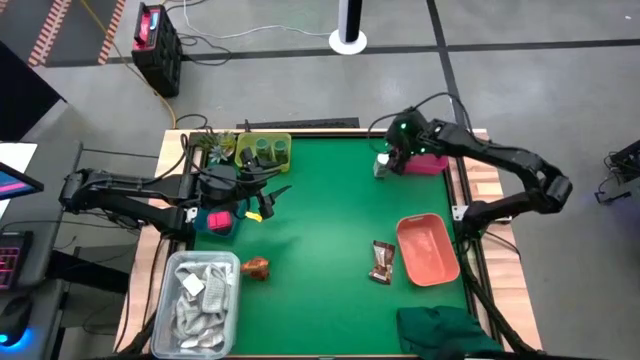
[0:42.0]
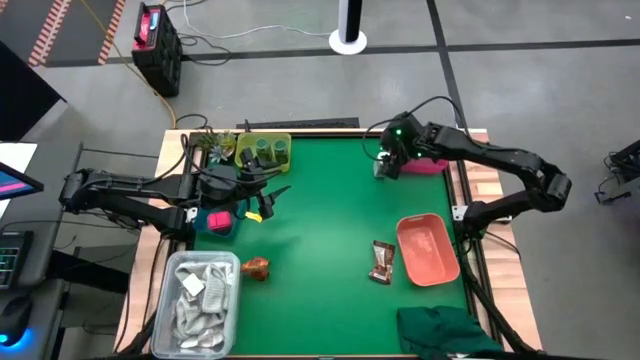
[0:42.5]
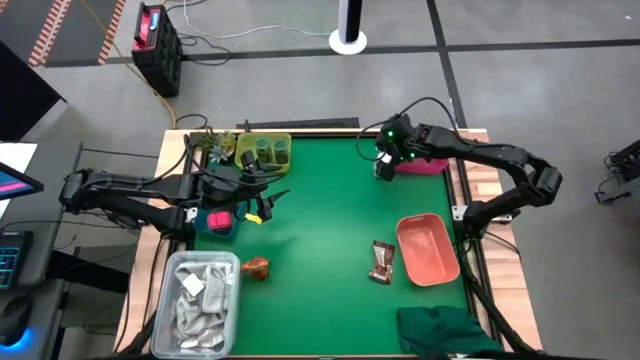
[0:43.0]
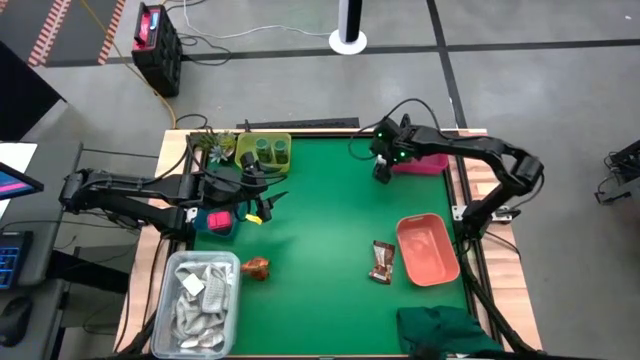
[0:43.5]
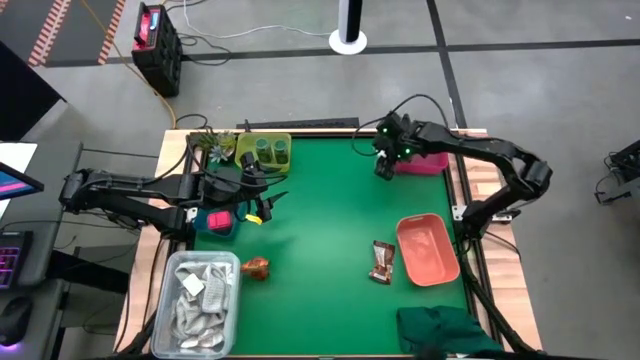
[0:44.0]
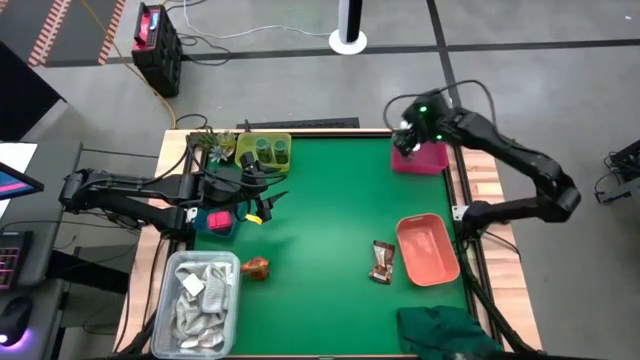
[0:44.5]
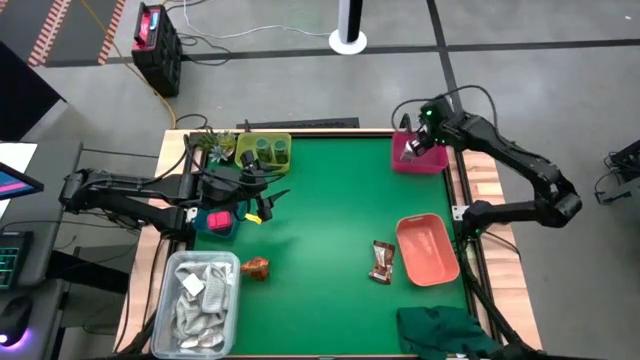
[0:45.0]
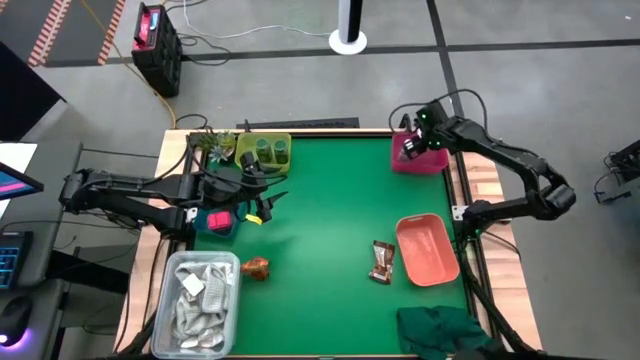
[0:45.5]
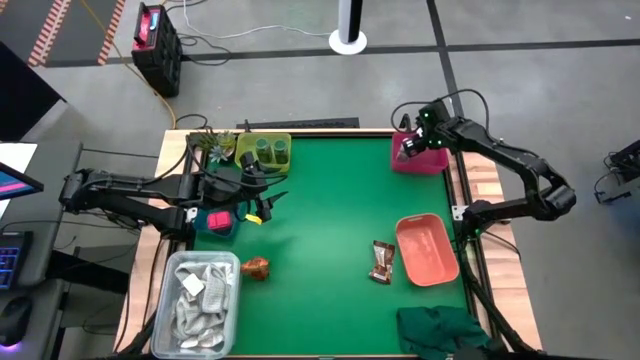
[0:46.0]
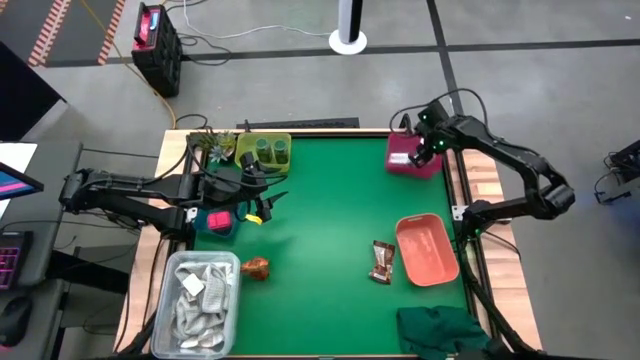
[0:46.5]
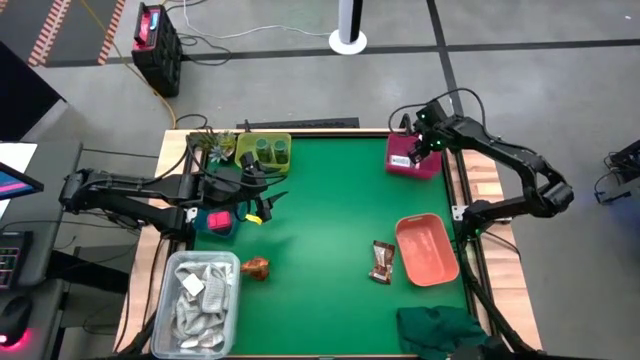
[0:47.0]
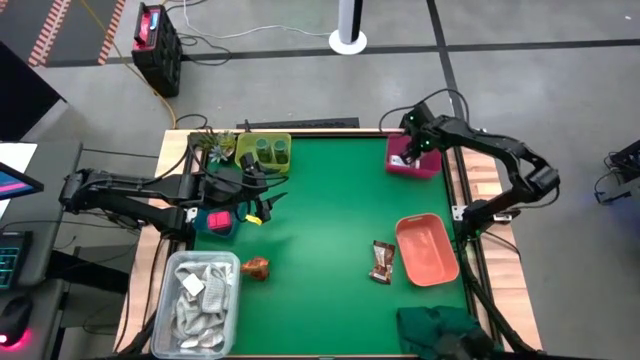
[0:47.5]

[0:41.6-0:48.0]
Task: Sort spices by type
Put the white seasoning bottle into the red bin

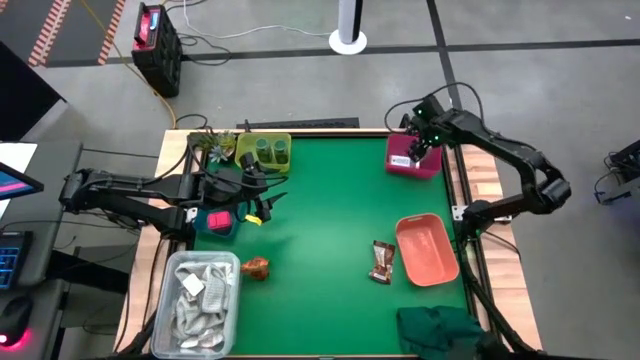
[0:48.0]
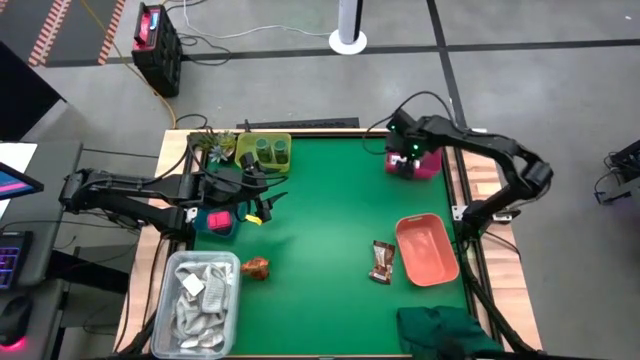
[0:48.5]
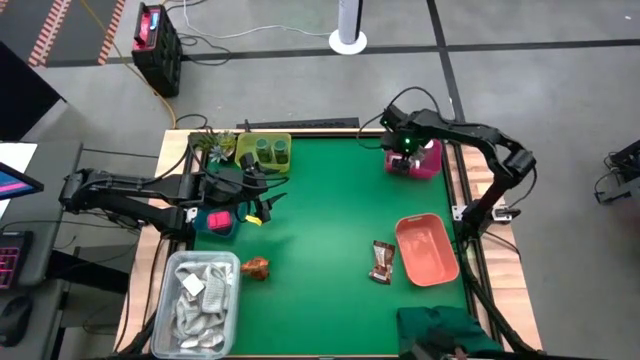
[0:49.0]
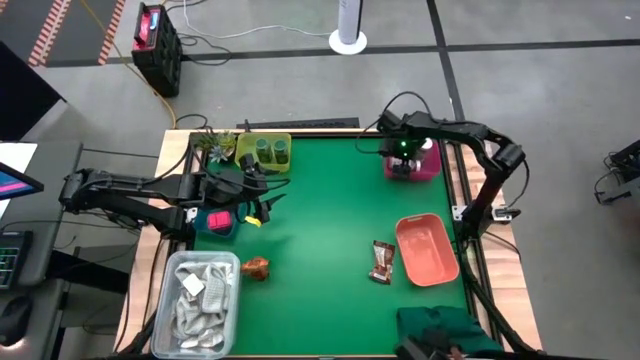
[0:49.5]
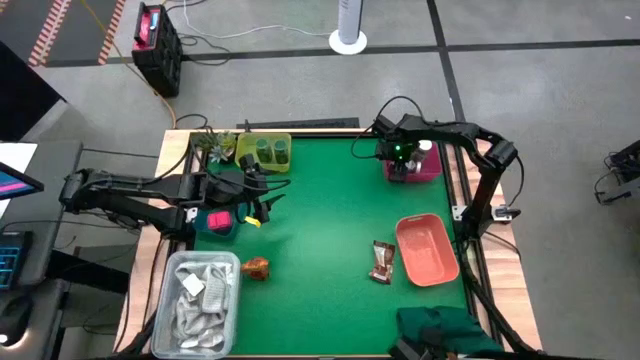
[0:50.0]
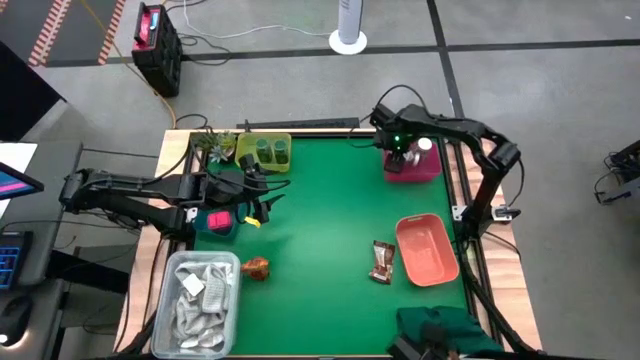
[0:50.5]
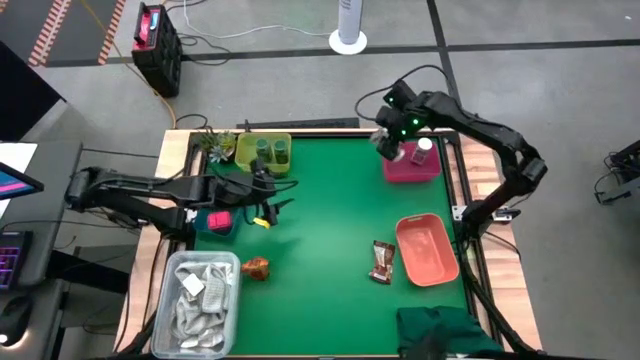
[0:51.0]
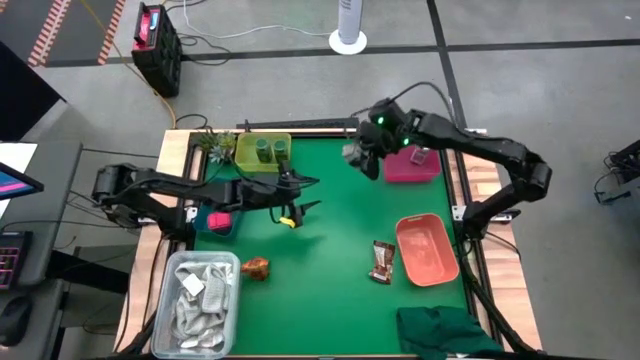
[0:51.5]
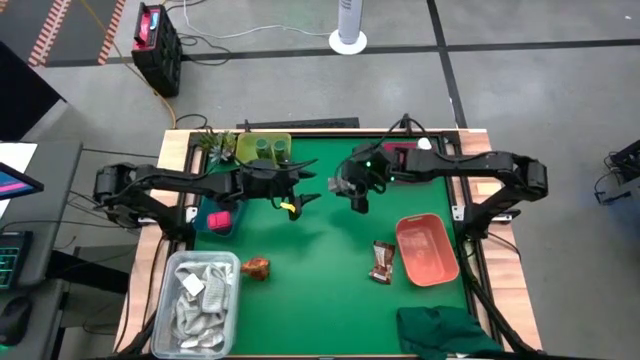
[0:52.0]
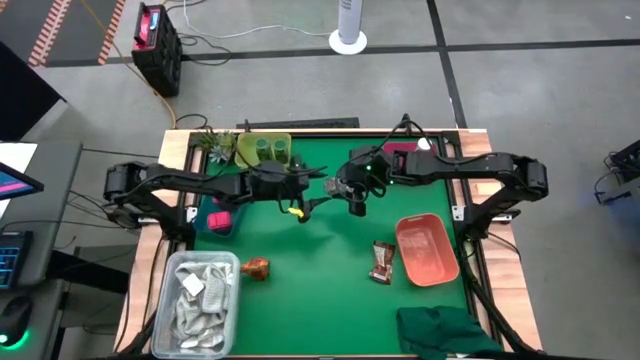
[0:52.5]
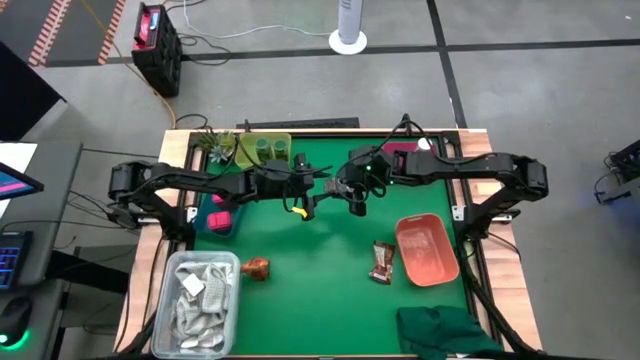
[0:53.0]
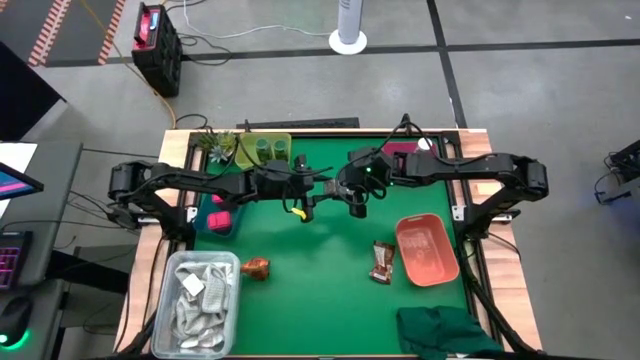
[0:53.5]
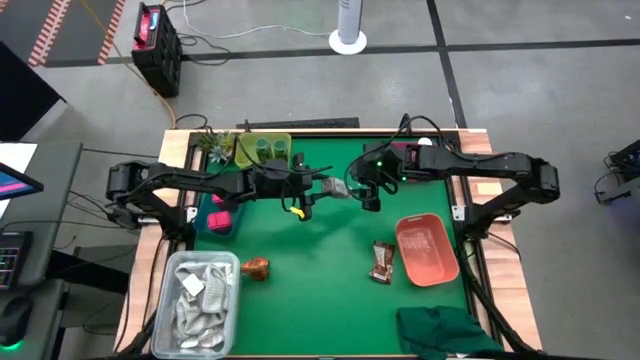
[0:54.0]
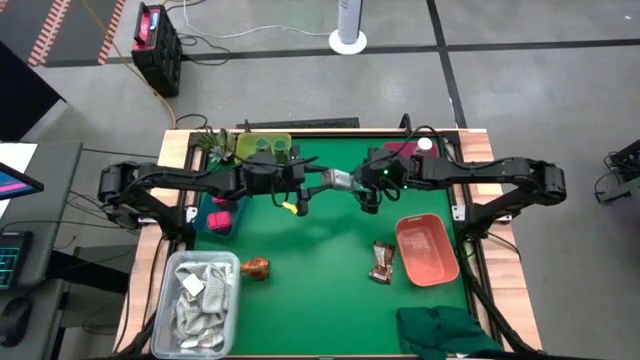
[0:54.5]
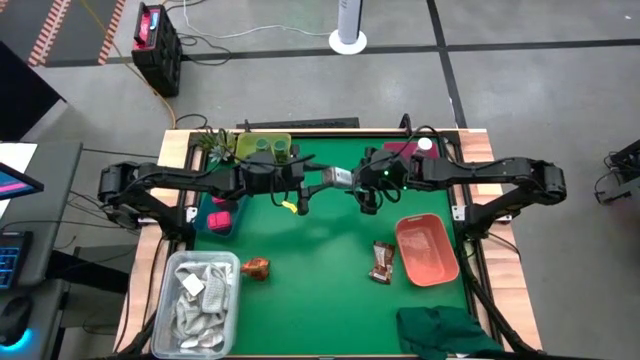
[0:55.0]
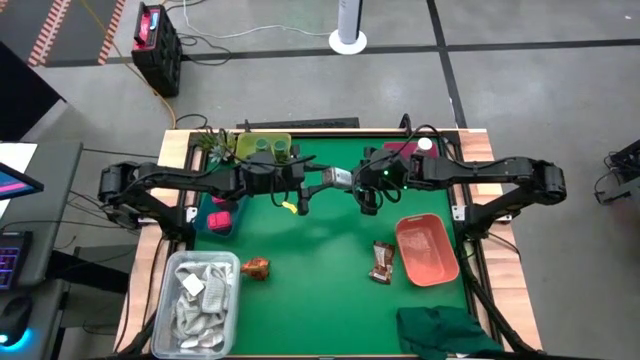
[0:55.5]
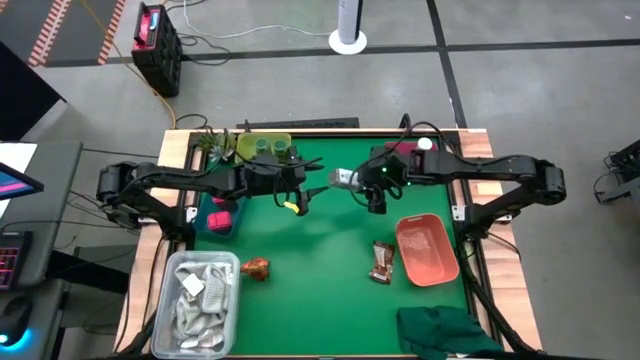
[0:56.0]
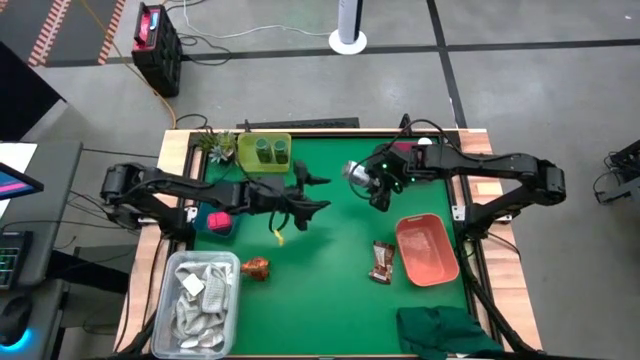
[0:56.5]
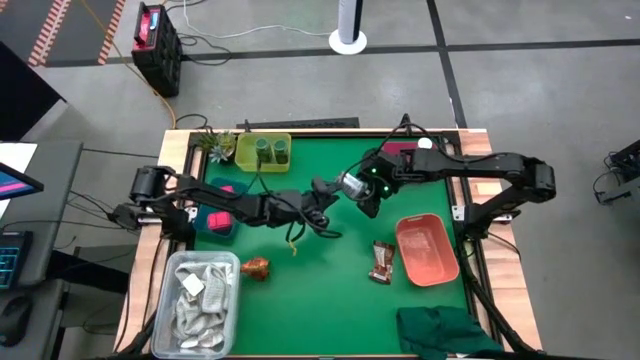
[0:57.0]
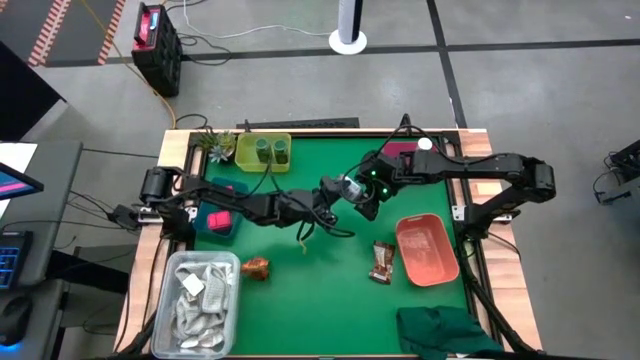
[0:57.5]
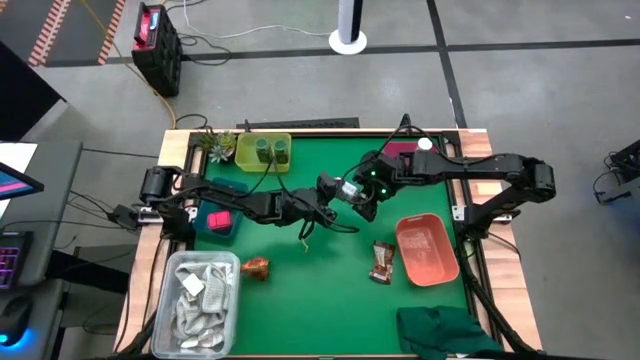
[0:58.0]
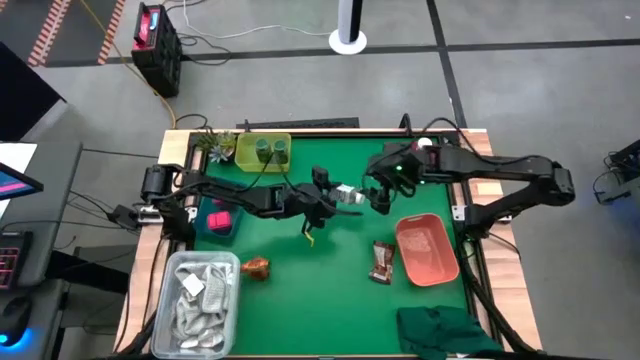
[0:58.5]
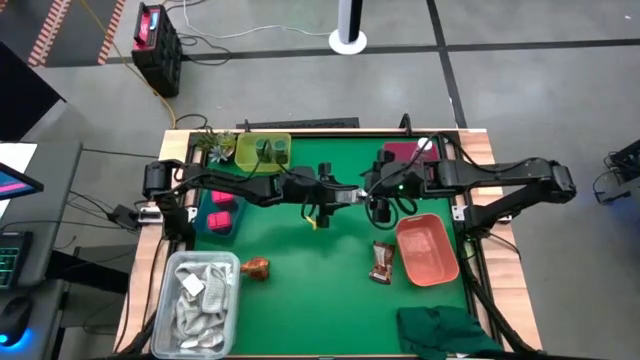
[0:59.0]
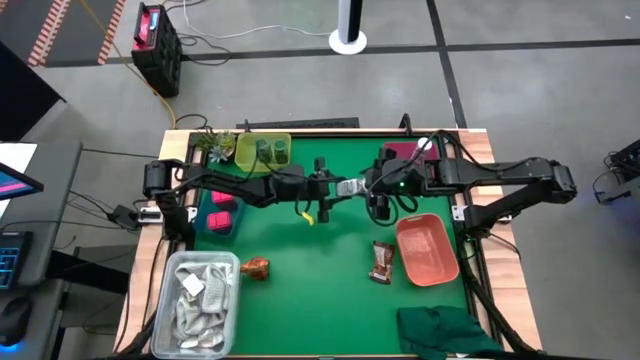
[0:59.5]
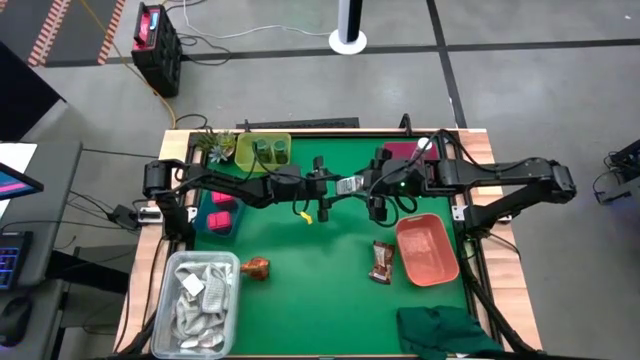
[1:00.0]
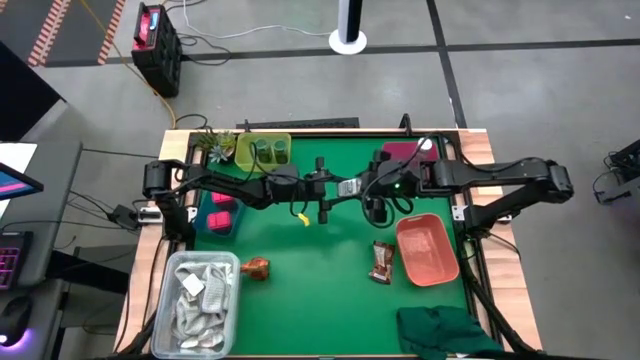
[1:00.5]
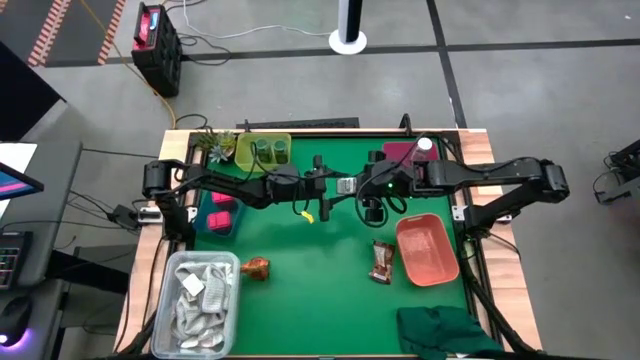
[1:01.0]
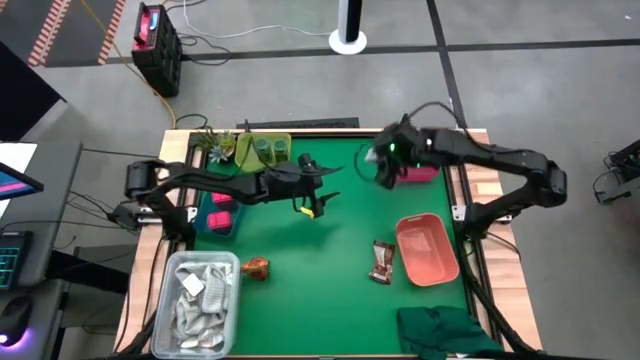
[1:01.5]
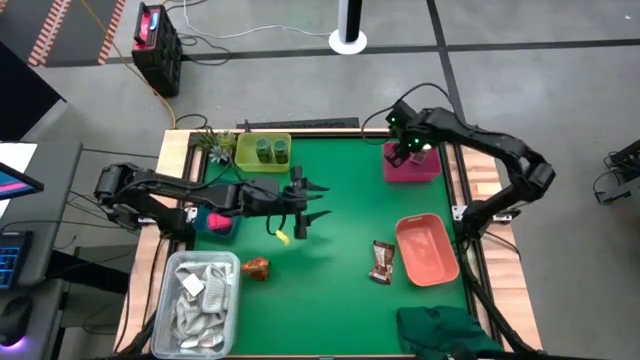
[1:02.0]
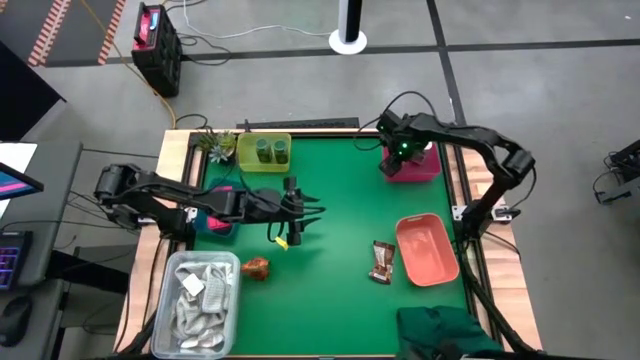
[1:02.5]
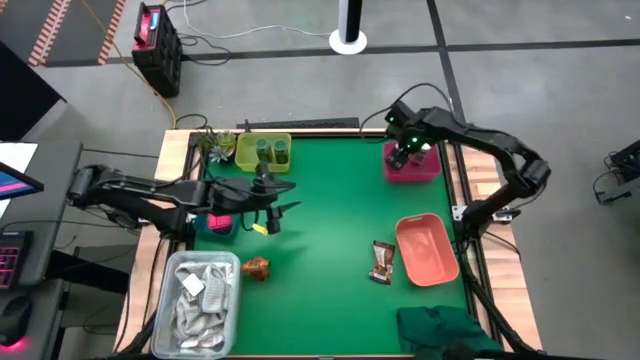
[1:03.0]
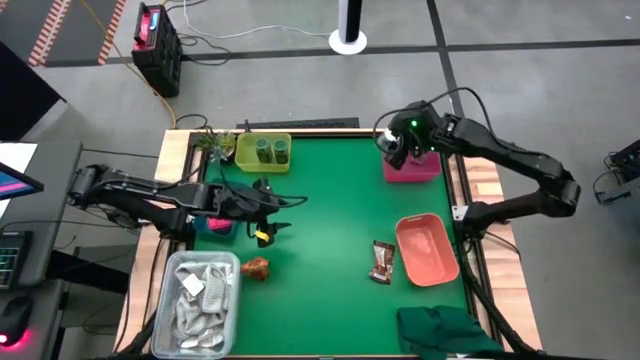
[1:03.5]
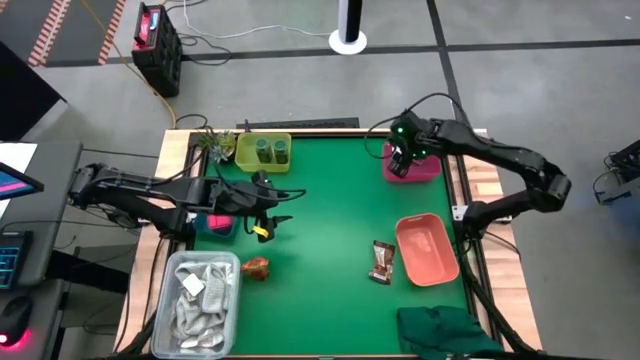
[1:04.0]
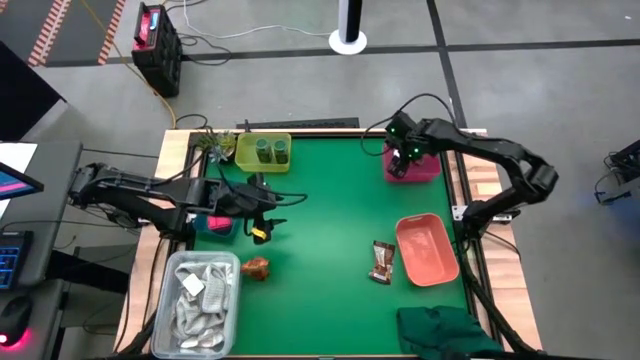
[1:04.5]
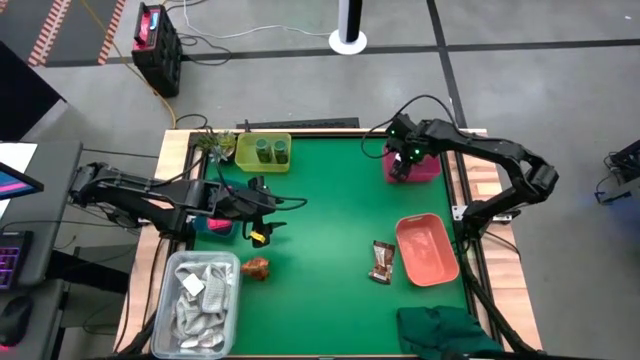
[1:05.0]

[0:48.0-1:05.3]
Adjust the white seasoning bottle into the red bin
